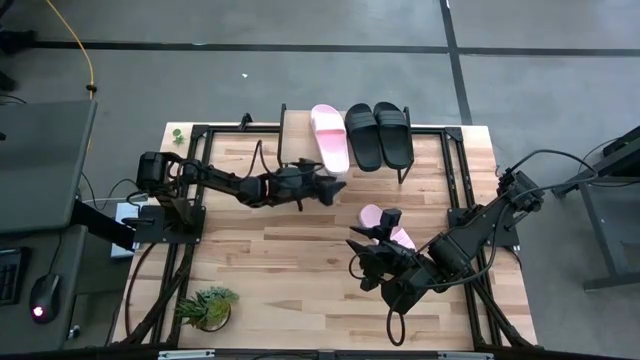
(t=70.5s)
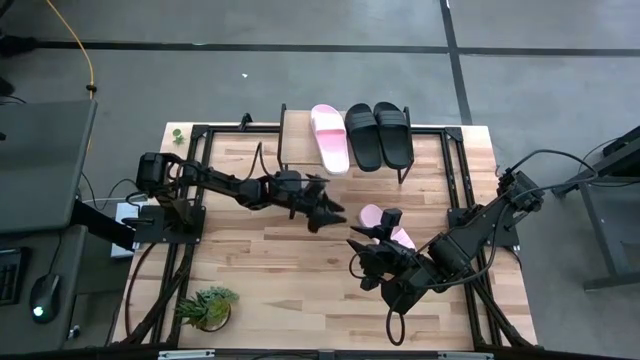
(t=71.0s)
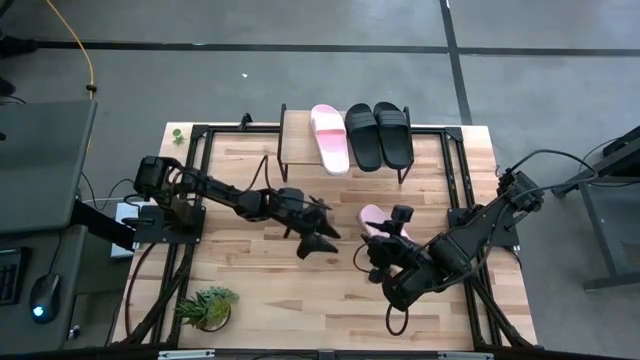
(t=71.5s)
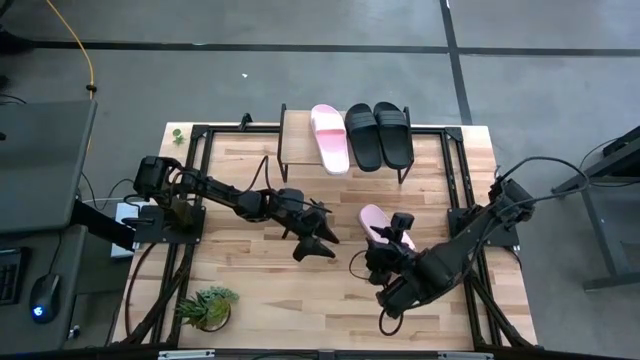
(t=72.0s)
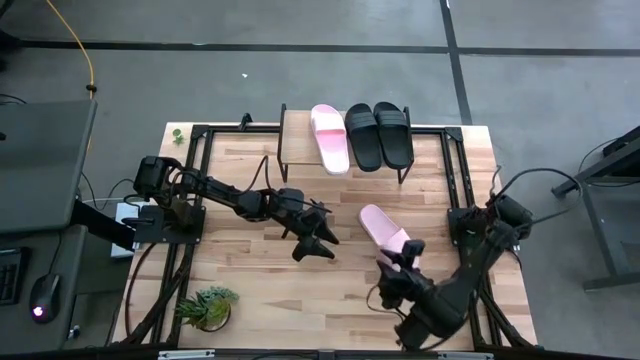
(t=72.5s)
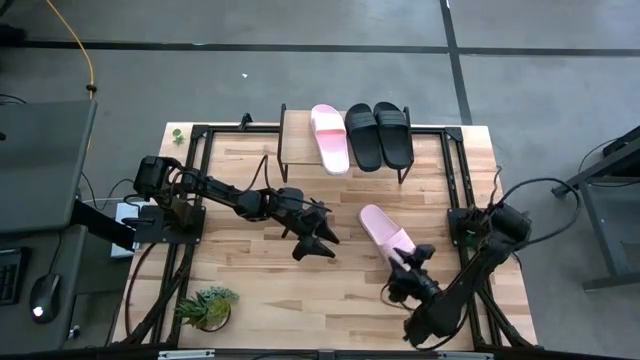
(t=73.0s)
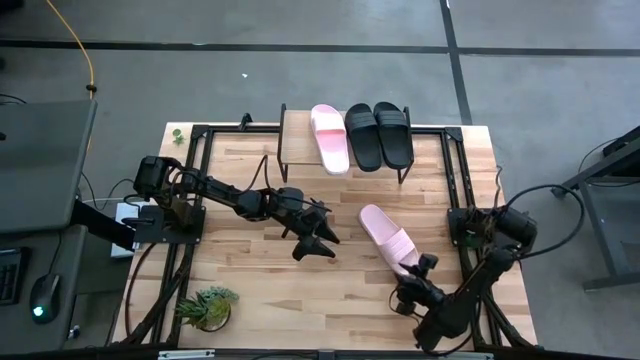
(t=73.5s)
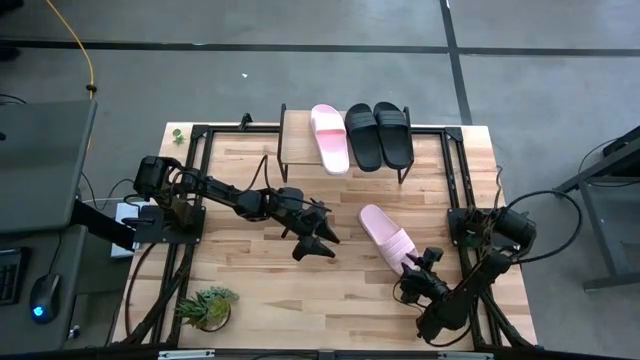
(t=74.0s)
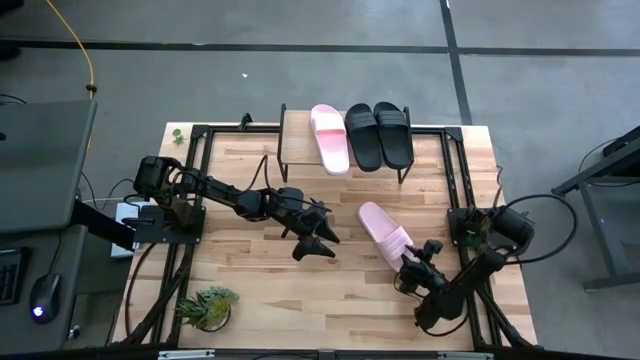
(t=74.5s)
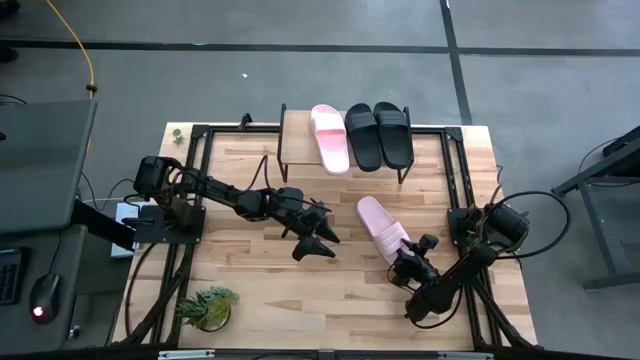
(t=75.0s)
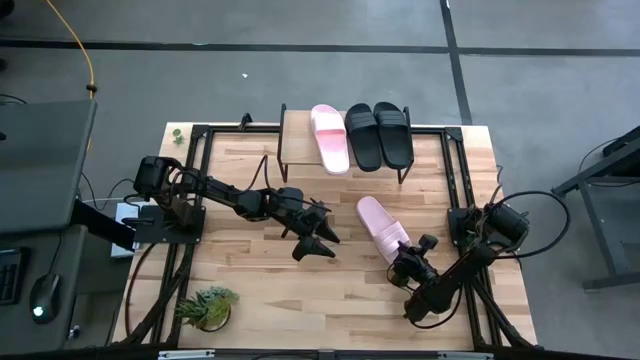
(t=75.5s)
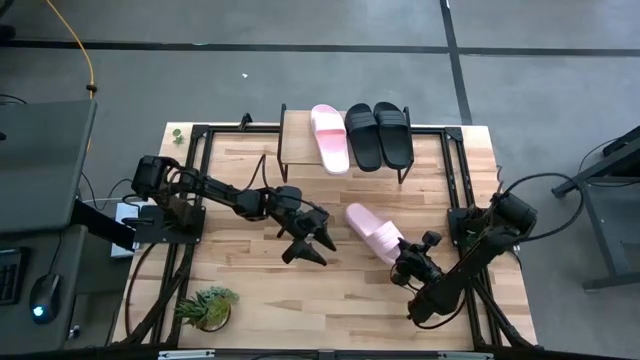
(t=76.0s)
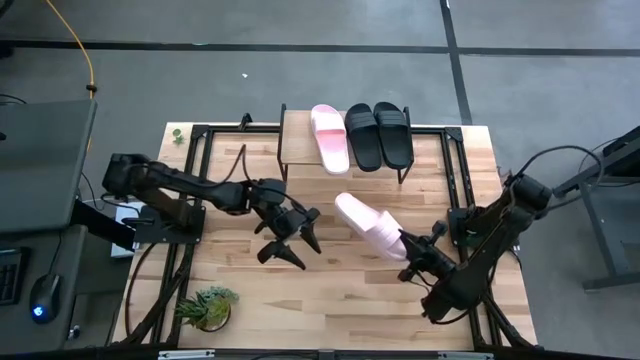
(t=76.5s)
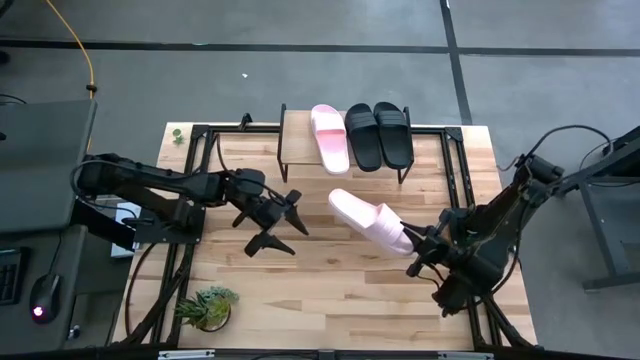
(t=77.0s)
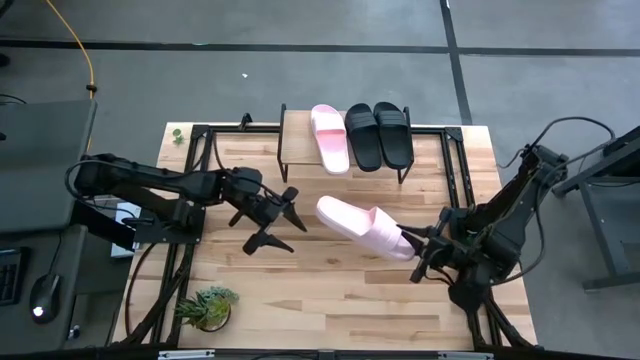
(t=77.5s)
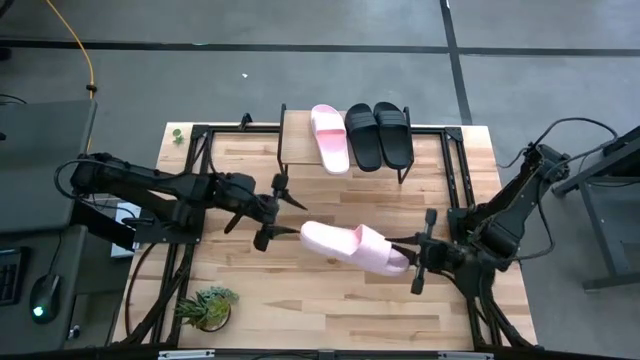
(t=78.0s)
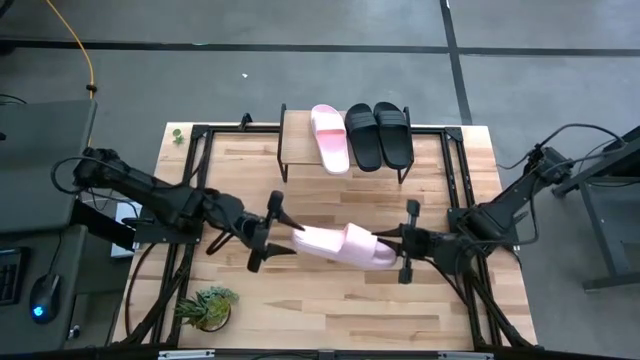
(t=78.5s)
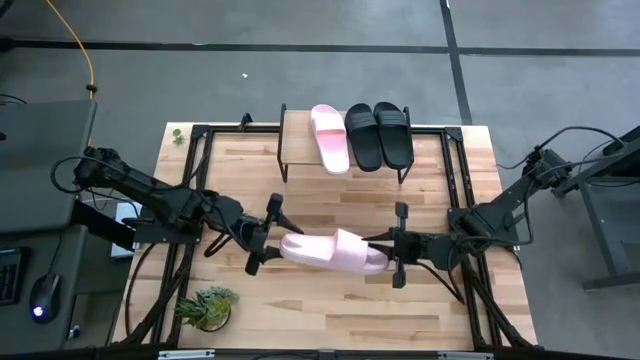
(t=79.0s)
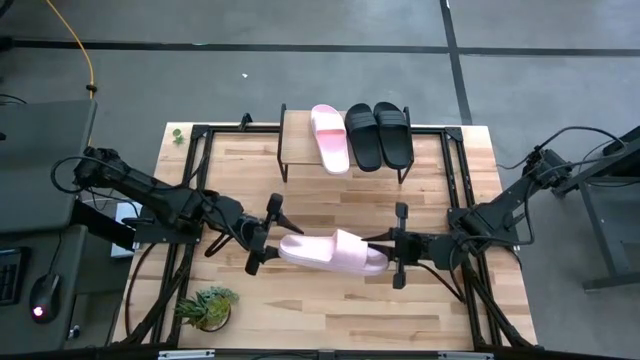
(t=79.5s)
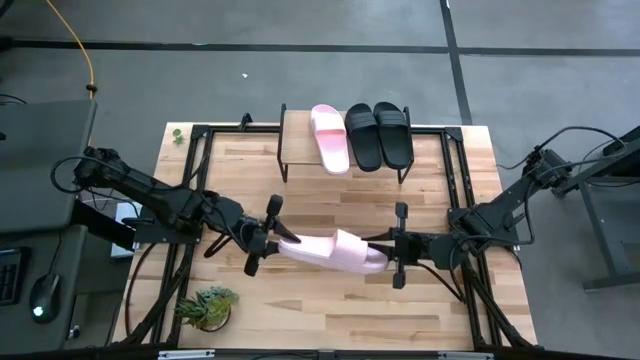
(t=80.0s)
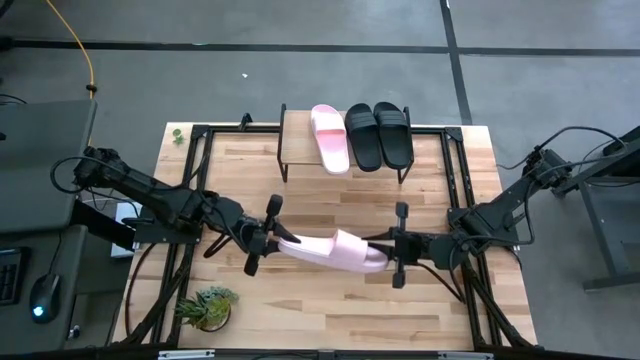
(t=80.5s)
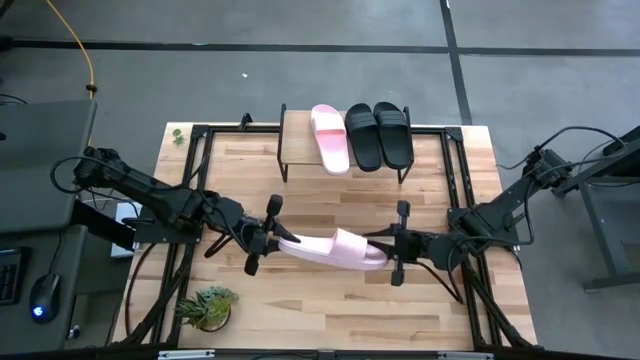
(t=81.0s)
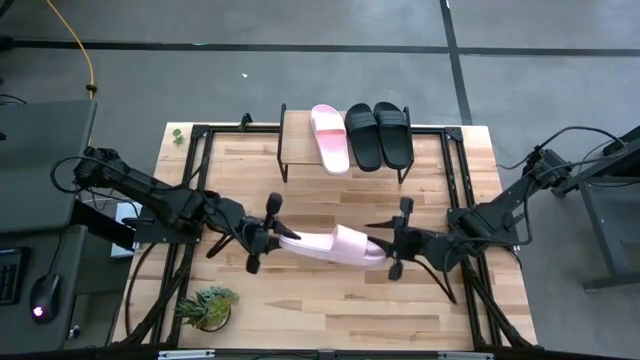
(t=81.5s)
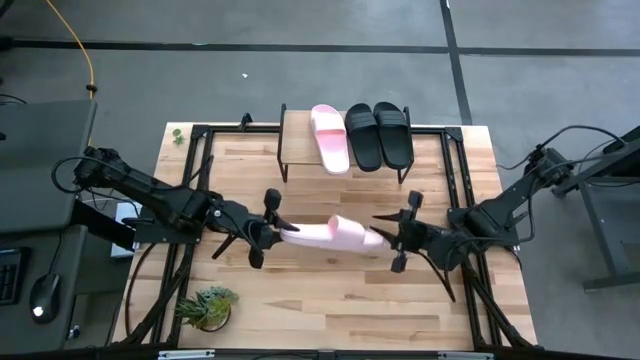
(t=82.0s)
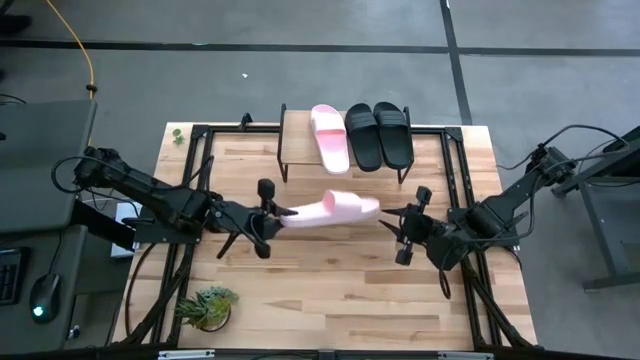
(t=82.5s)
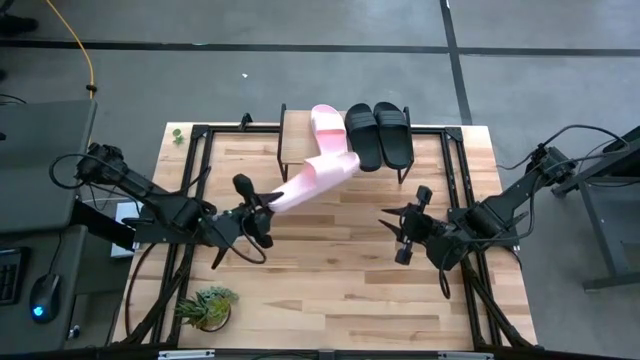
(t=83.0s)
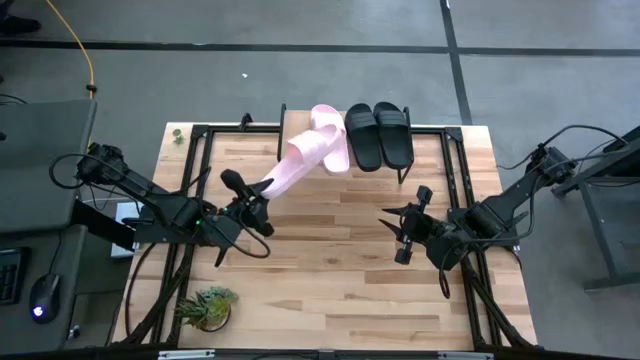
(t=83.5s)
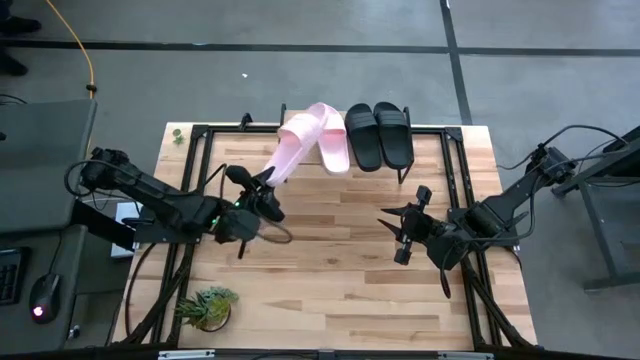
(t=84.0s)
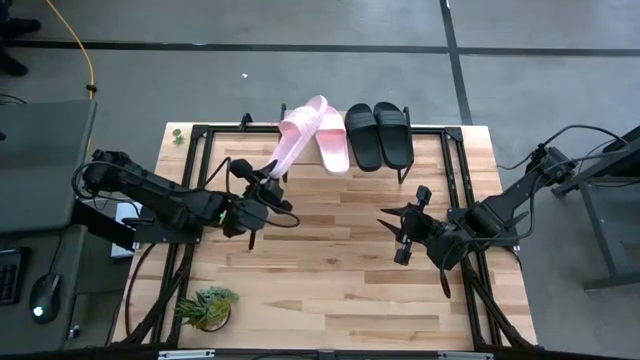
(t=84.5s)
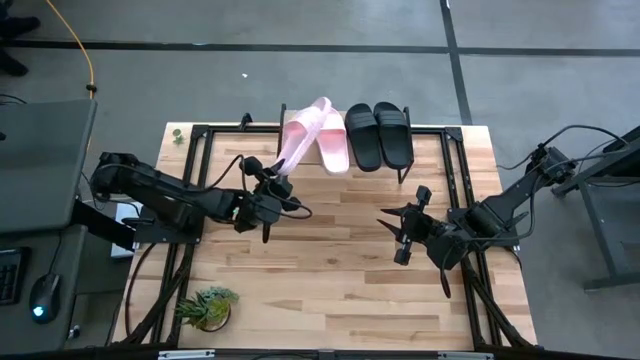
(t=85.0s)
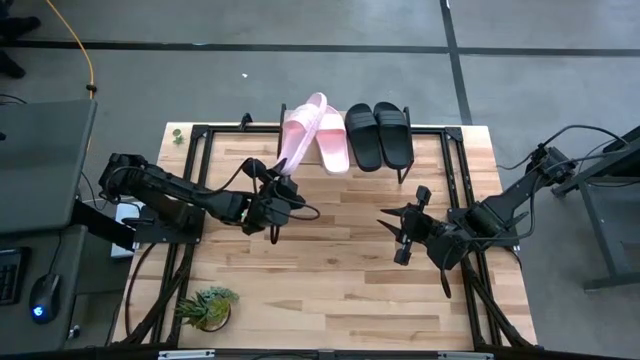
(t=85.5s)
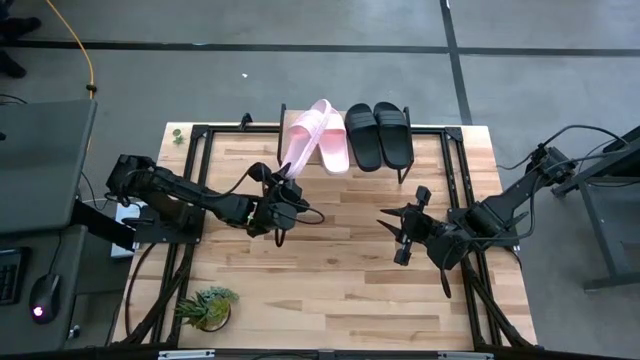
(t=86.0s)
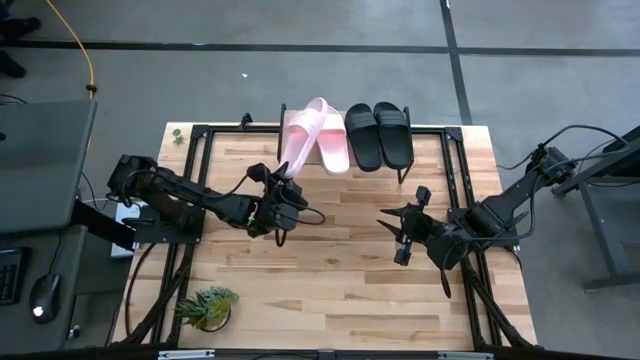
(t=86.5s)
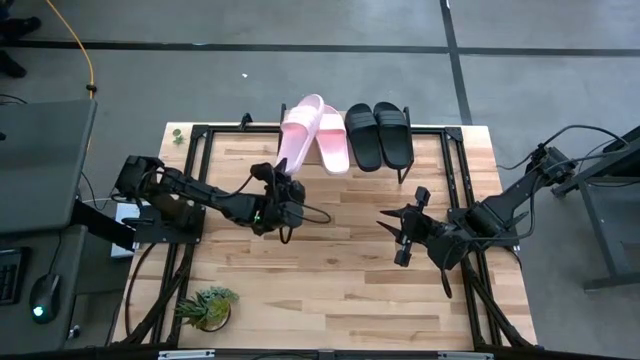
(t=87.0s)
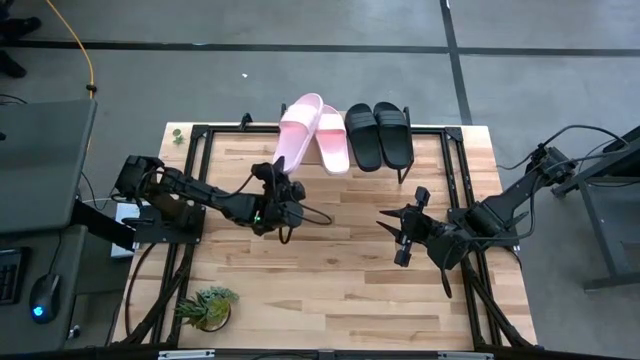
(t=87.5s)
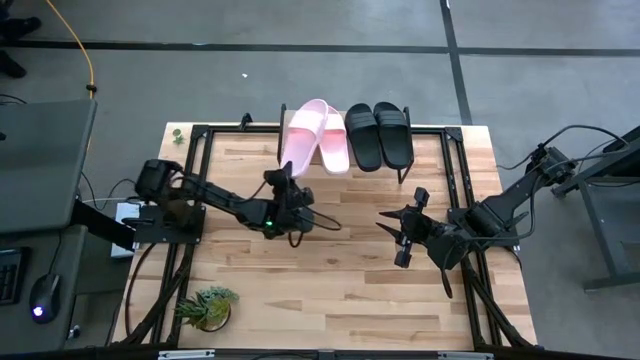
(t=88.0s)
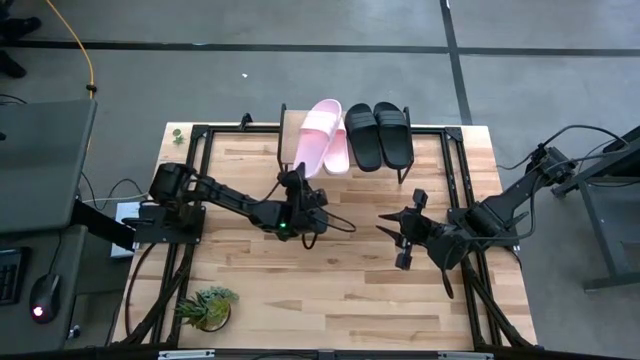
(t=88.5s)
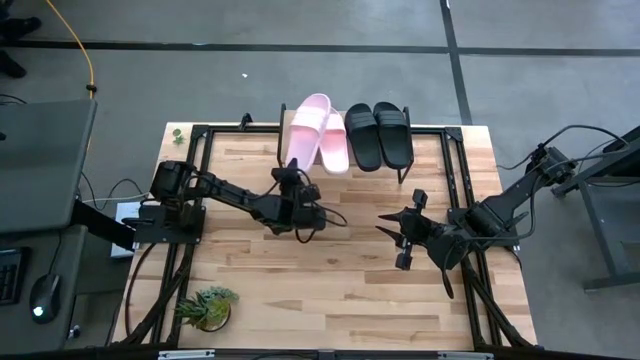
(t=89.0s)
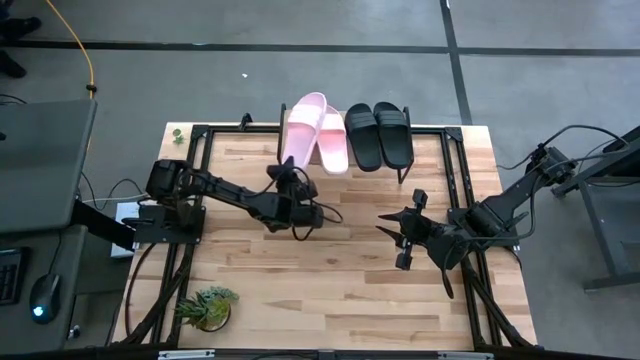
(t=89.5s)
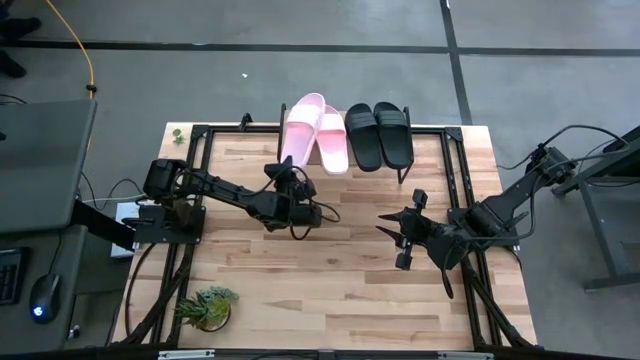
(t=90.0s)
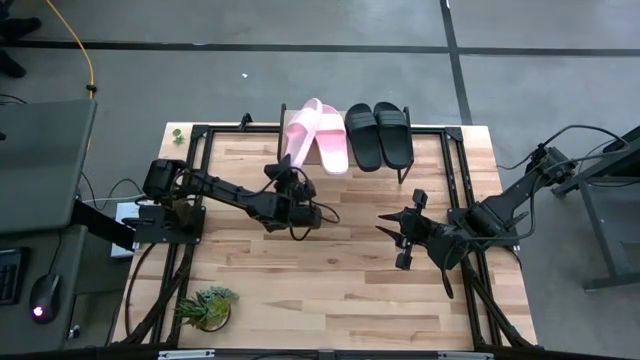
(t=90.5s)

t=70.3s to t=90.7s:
Task: Pick and place slides into the shelf
Put the pink slide on the shelf
